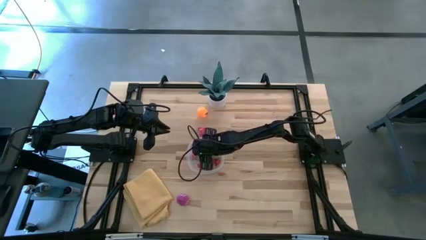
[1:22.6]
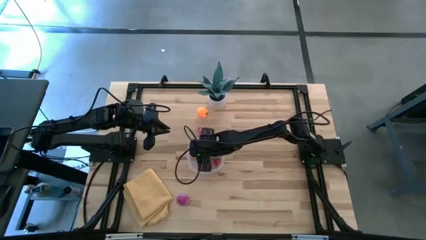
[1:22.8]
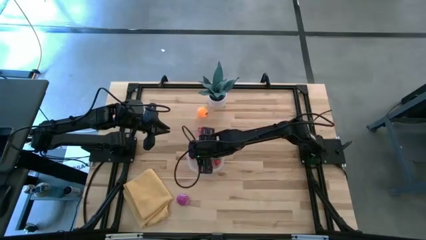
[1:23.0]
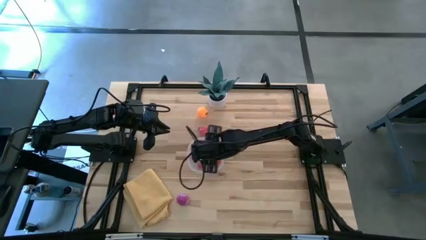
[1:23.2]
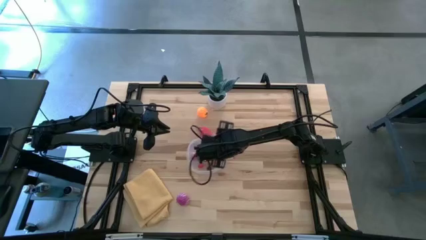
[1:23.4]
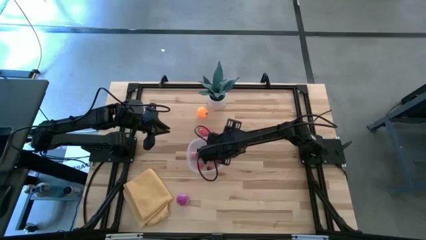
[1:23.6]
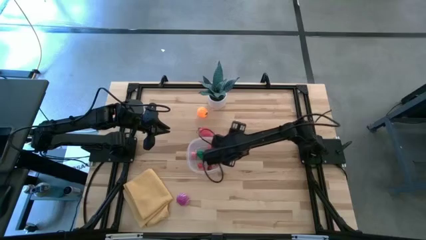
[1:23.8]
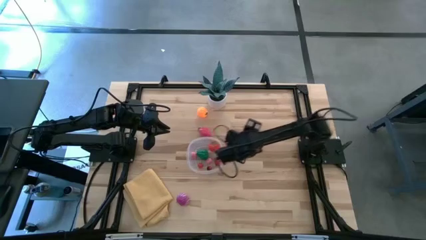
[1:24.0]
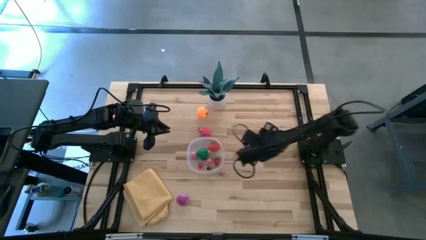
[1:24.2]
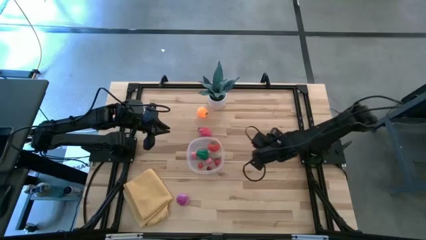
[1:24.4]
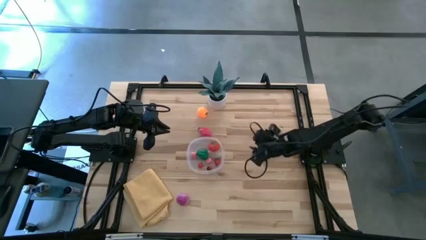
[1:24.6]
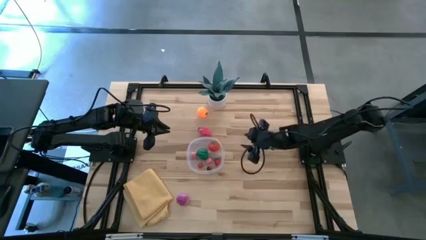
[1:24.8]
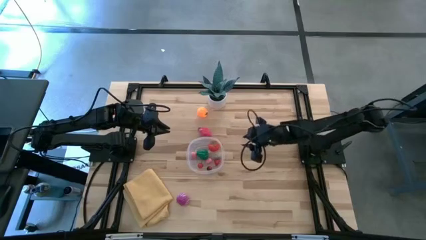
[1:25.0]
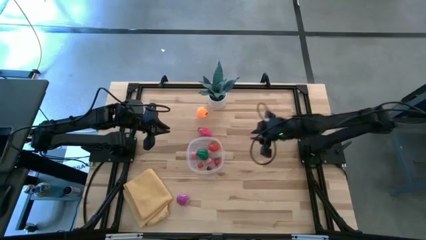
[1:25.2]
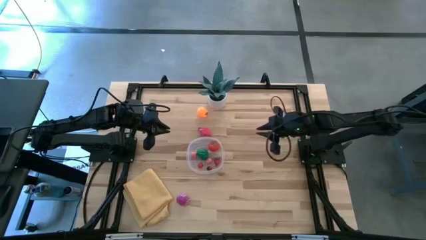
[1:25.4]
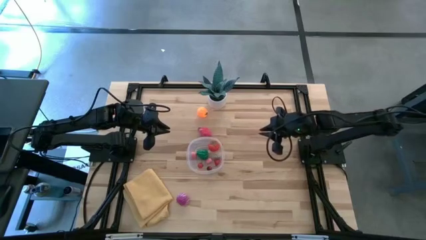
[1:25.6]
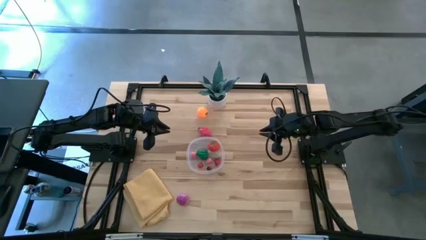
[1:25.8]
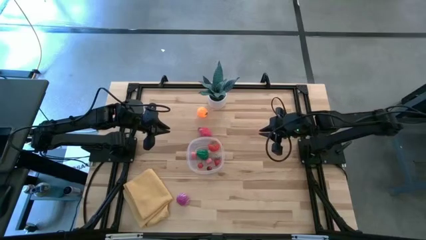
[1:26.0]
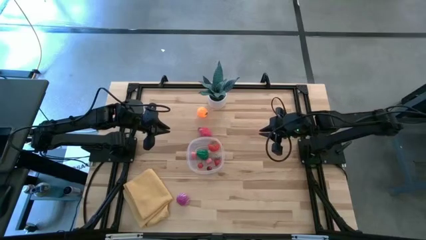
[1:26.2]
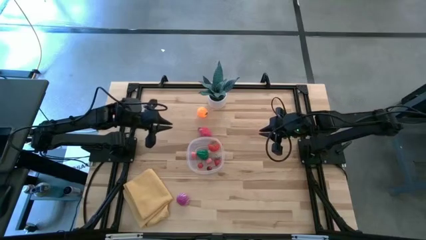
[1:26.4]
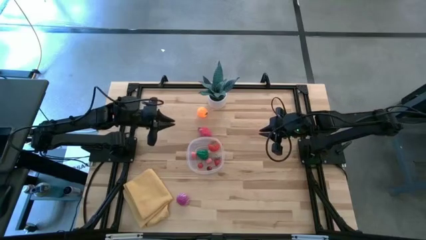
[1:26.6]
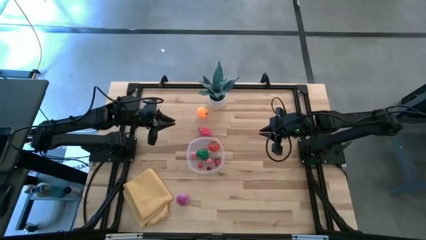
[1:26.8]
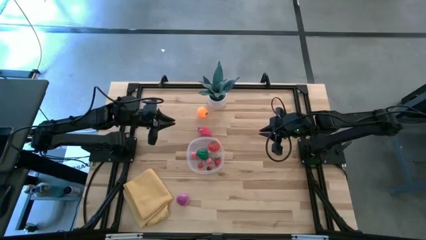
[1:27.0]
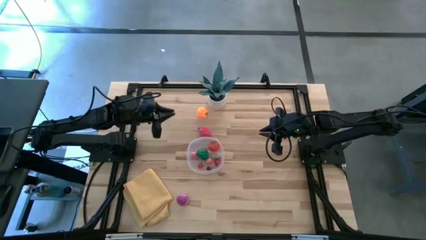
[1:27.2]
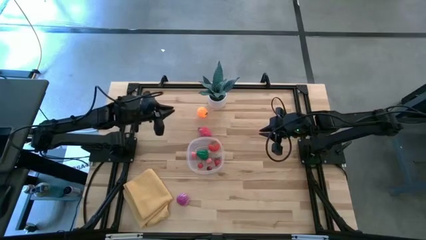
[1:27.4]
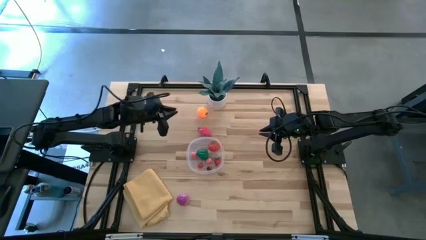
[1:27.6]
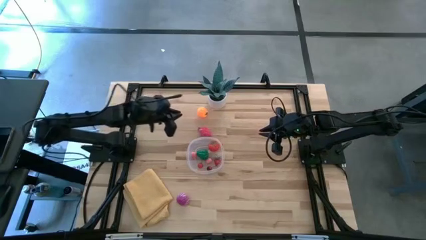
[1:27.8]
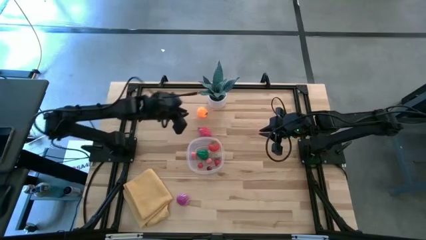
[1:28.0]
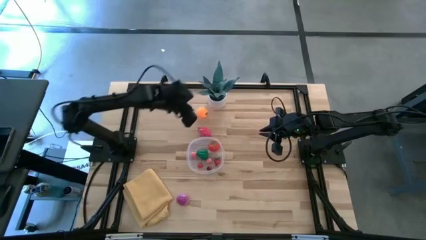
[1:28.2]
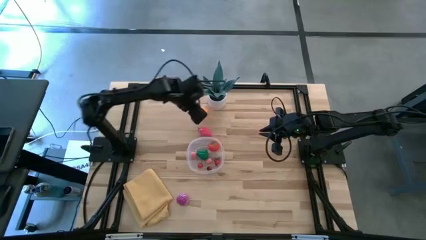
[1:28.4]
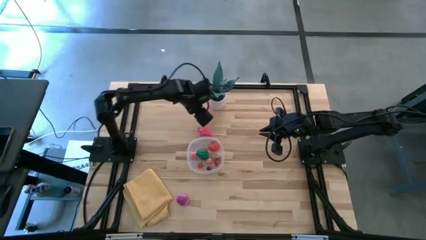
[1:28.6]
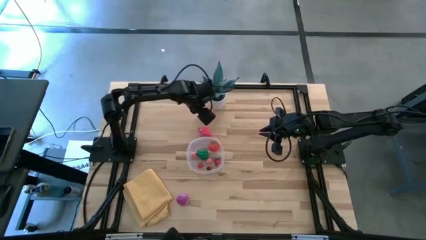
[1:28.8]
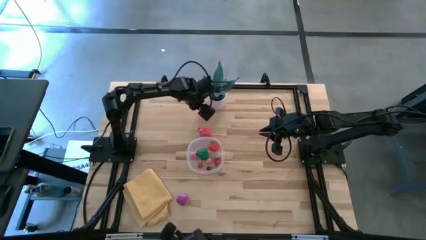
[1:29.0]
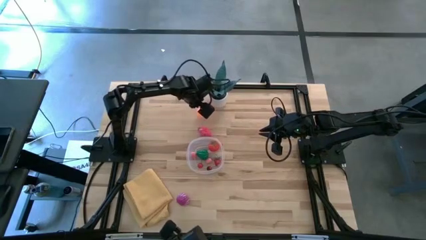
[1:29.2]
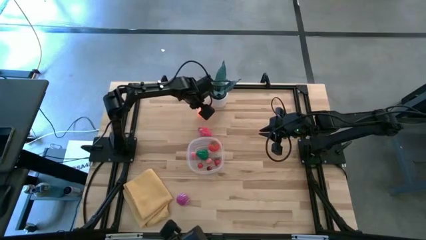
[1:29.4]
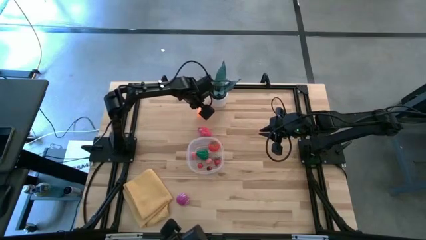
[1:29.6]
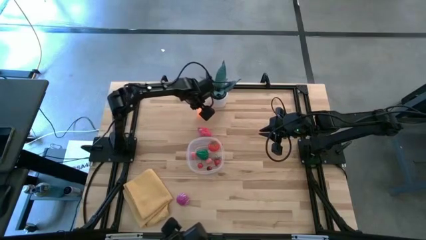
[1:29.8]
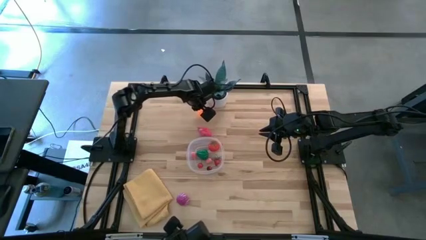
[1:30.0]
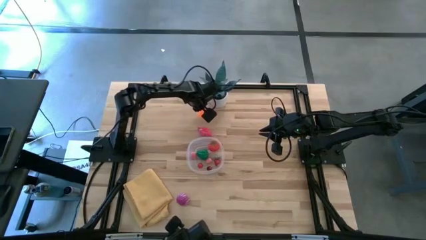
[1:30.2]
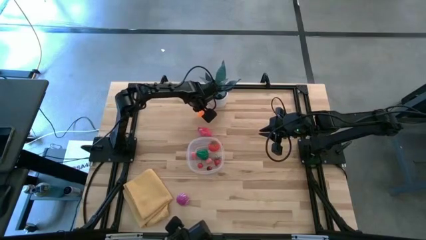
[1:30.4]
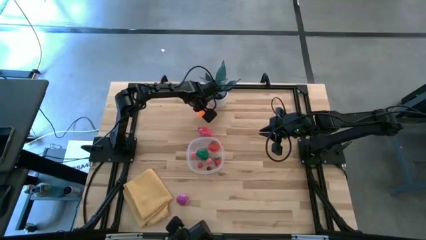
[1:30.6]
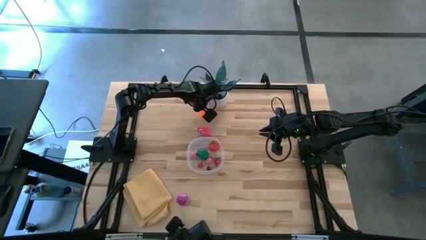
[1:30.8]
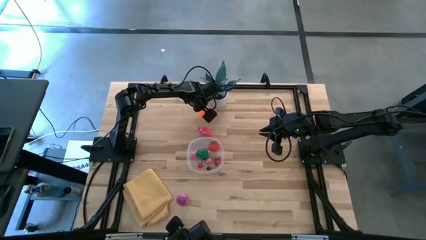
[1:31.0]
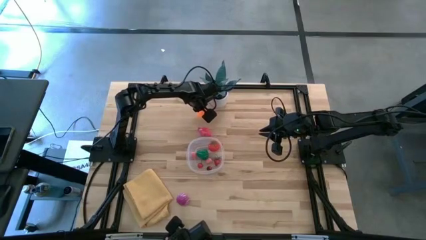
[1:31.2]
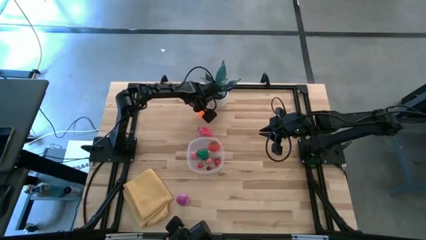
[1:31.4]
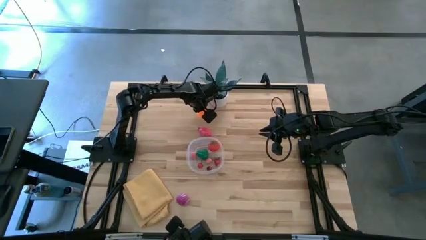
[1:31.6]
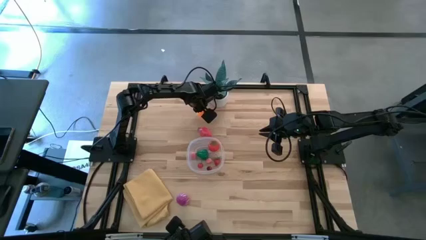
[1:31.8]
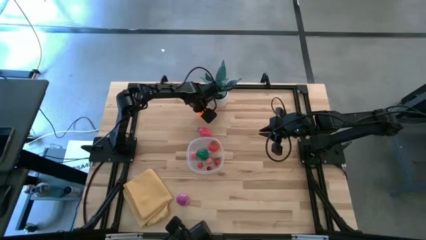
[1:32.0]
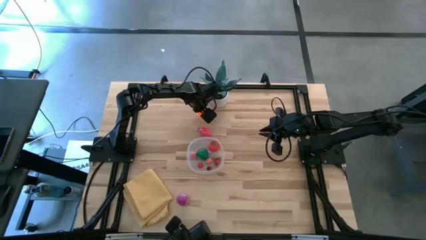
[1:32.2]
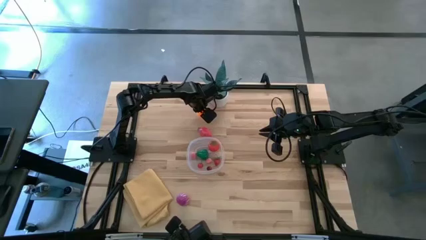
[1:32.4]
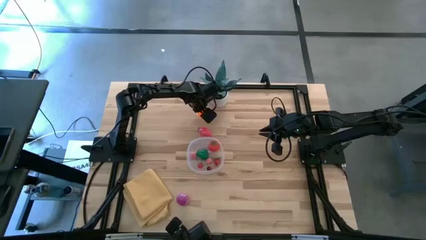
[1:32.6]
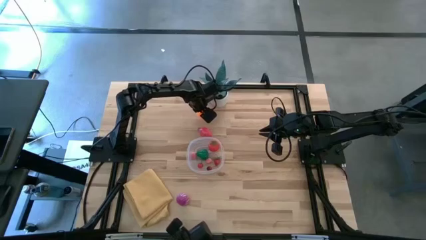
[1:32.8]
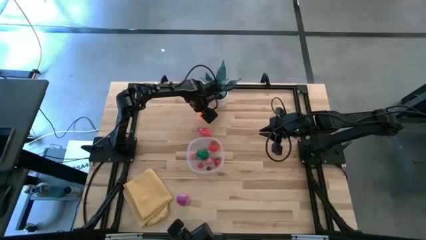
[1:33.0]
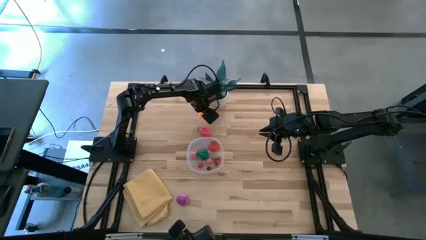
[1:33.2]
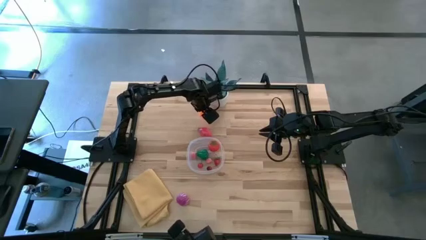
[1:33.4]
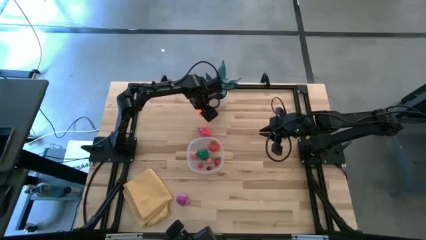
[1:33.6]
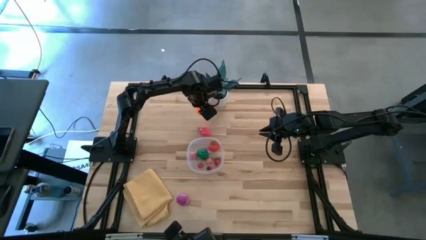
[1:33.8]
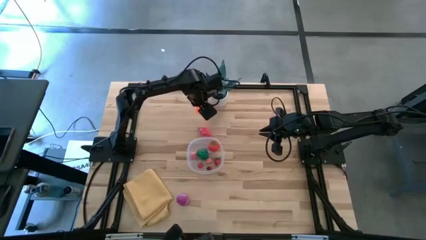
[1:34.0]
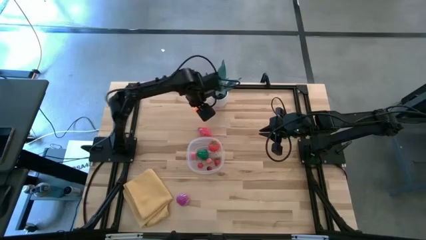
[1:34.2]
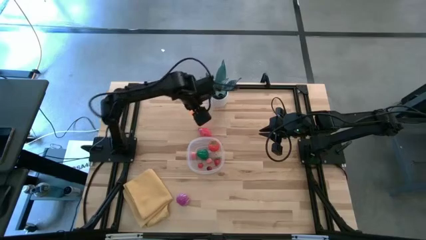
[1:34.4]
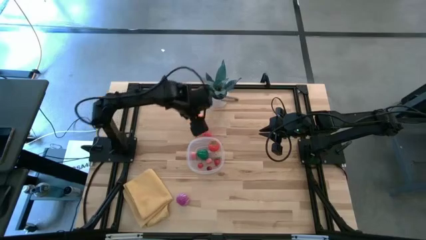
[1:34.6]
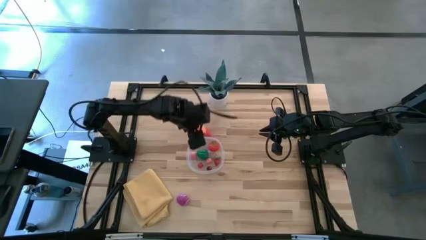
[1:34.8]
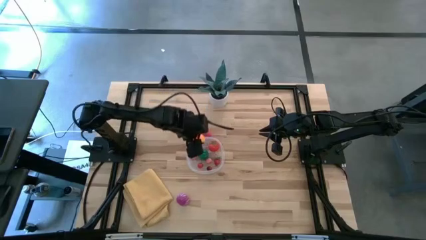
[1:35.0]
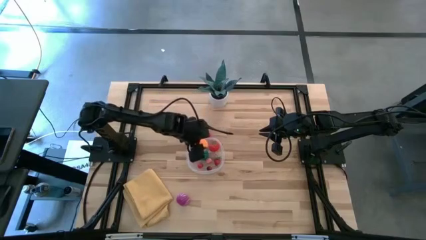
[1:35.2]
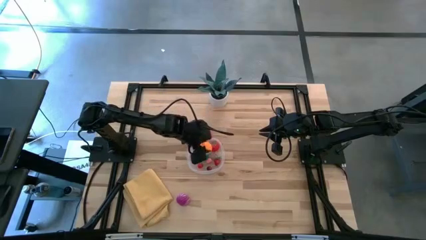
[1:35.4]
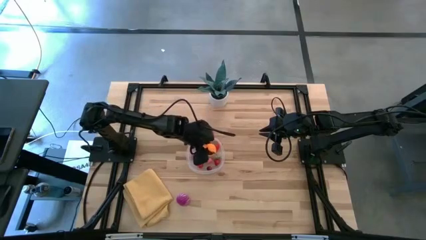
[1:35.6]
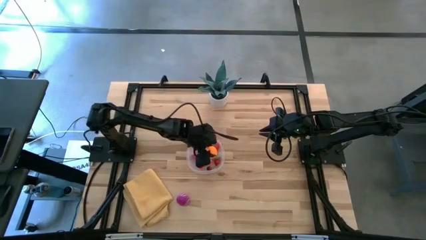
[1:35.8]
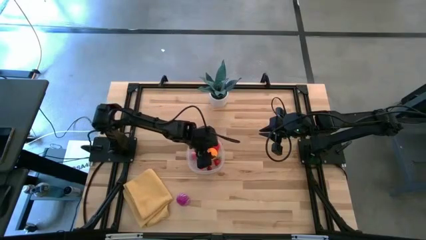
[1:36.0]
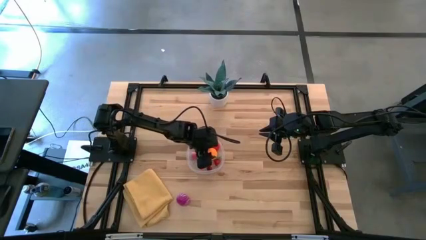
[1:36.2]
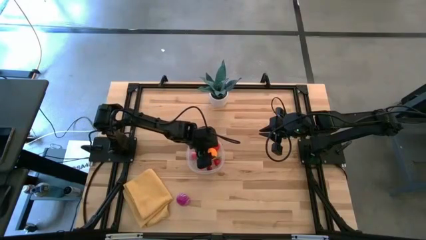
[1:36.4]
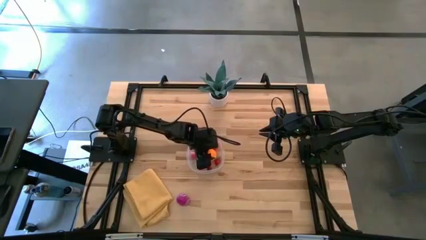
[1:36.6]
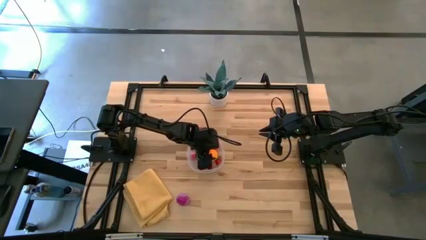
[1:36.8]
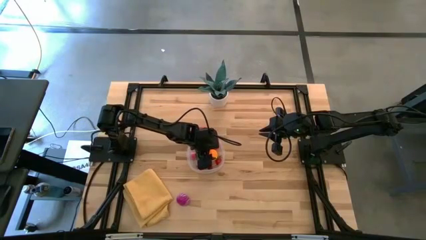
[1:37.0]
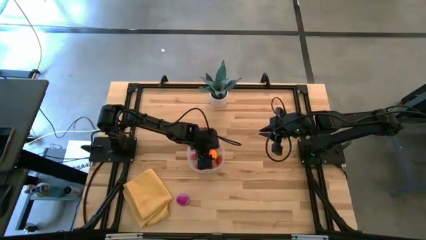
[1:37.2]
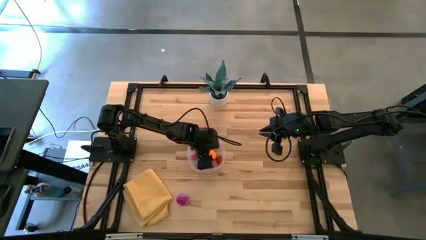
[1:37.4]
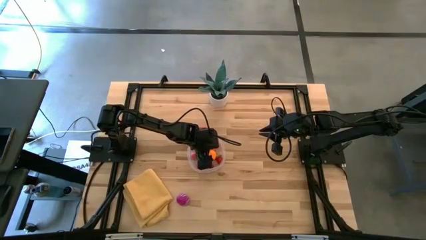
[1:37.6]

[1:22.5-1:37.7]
Task: Pick and placing Produce into tupperware
Put the orange into the transparent bin

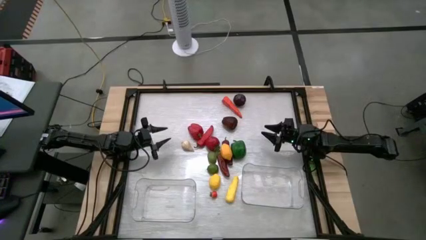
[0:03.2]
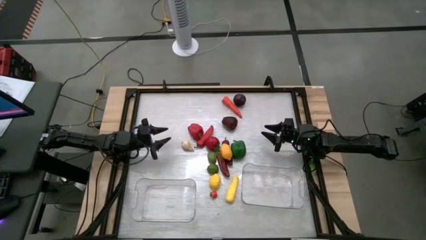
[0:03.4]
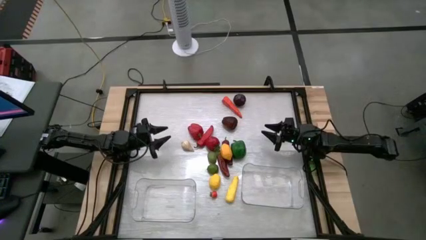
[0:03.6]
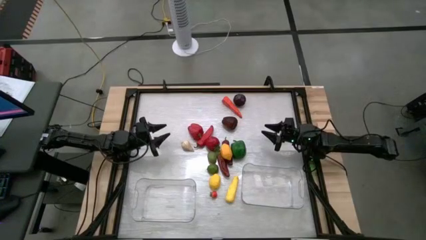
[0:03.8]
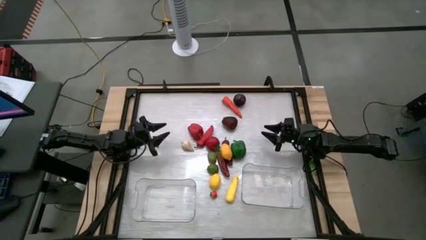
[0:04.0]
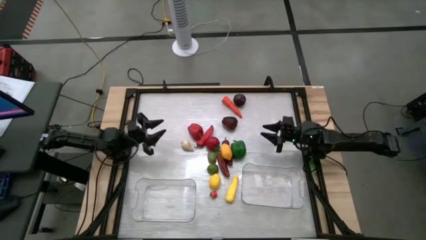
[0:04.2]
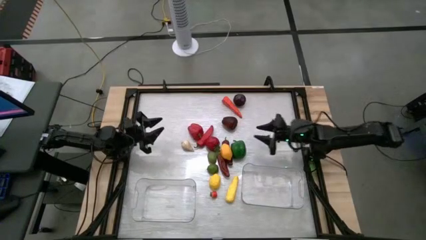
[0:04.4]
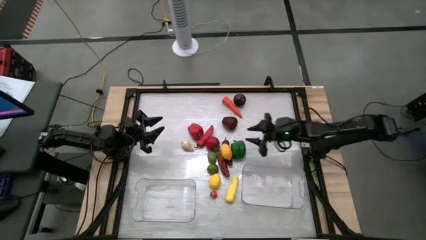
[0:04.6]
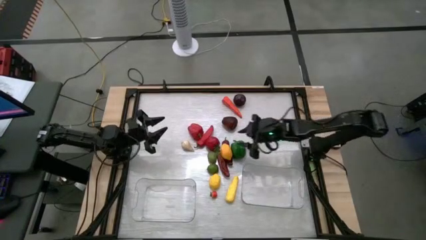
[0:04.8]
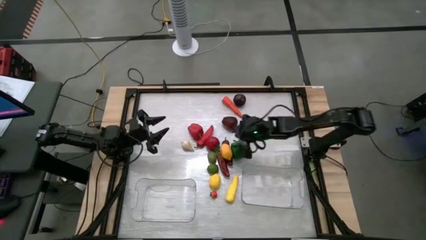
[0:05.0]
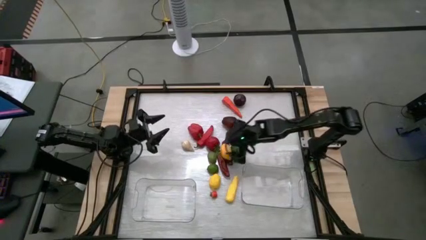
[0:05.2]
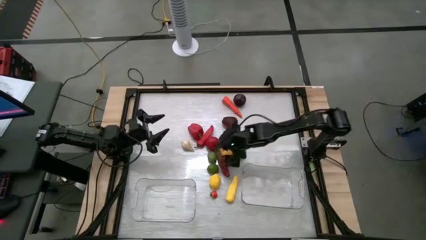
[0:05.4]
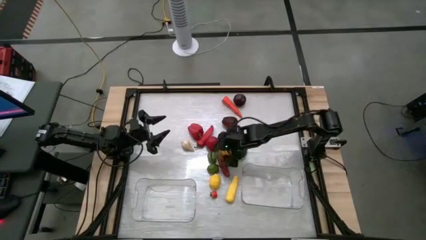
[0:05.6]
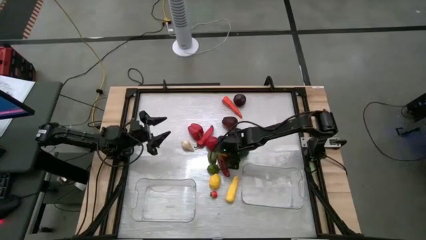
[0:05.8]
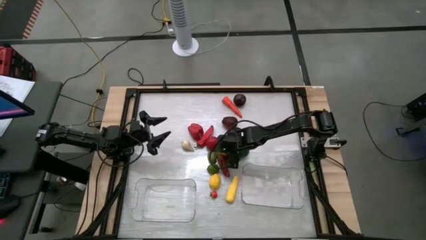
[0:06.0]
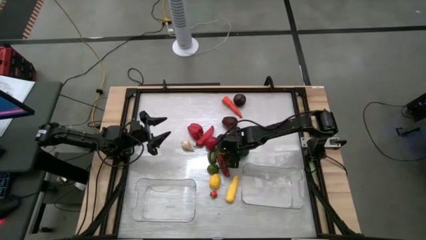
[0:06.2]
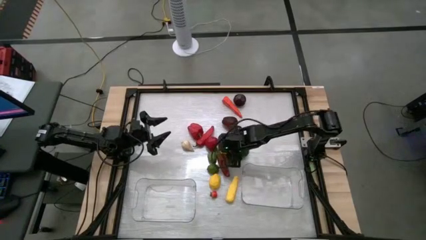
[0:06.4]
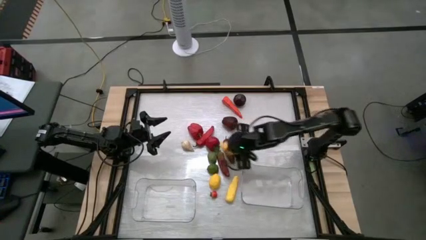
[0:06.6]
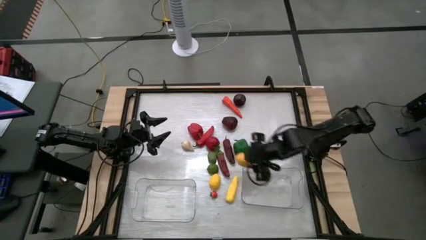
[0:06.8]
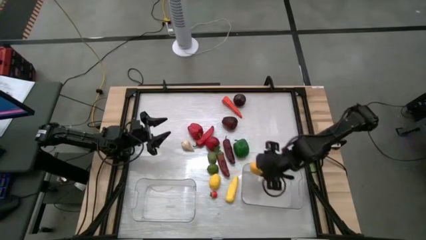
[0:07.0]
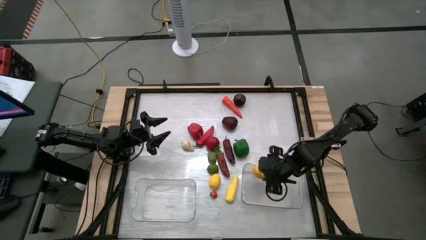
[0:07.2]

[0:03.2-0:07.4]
Task: Sort produce into baskets
Put the top yellow lemon into the right transparent bin
